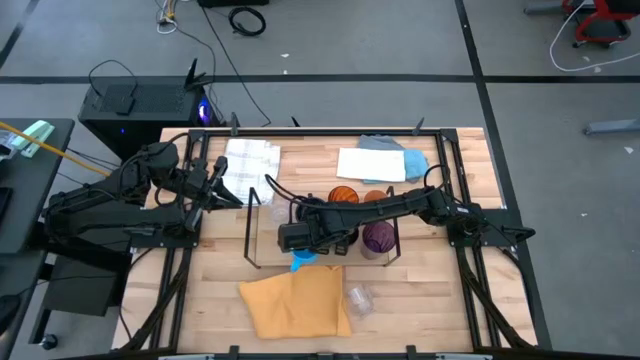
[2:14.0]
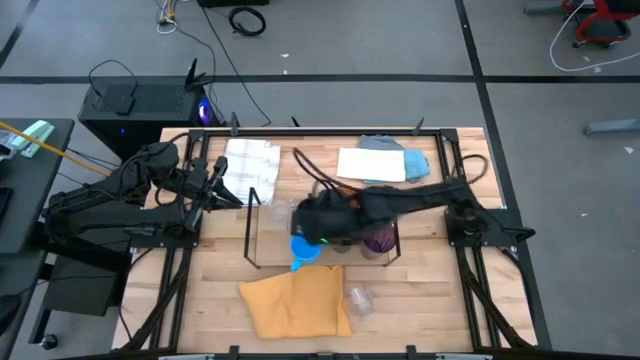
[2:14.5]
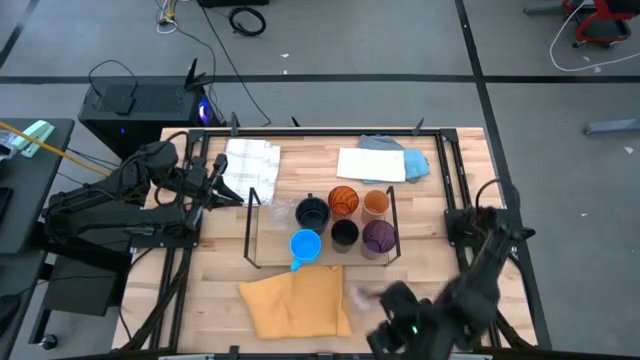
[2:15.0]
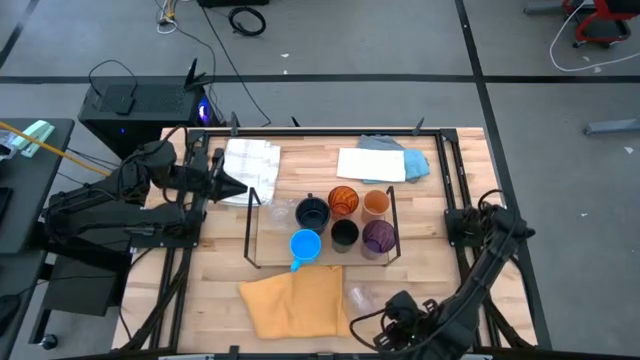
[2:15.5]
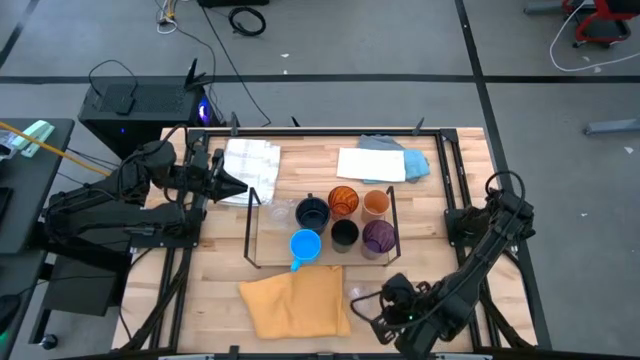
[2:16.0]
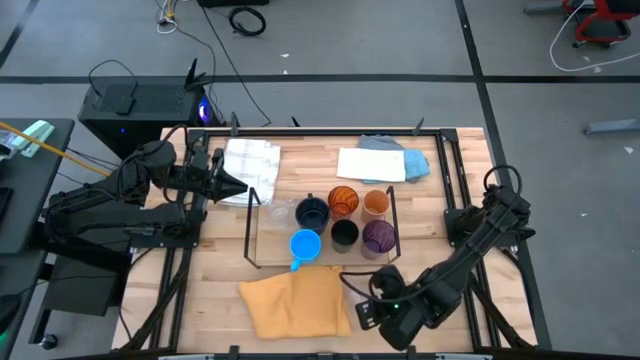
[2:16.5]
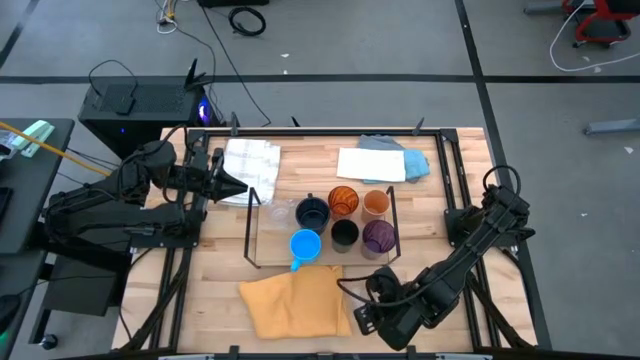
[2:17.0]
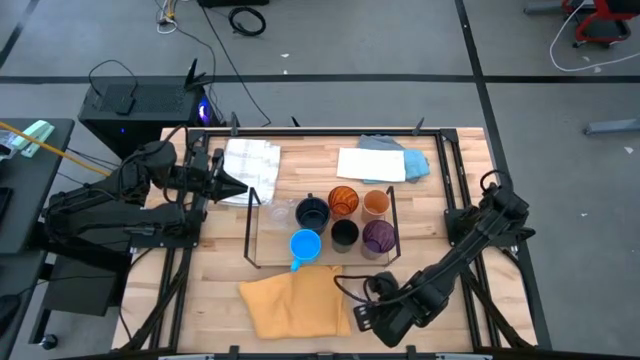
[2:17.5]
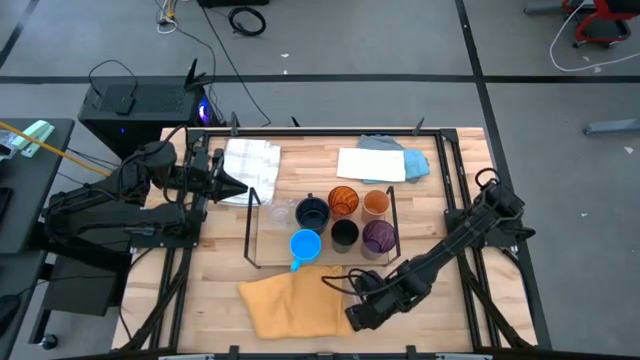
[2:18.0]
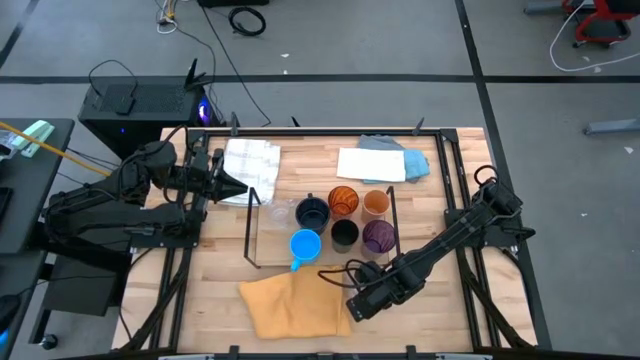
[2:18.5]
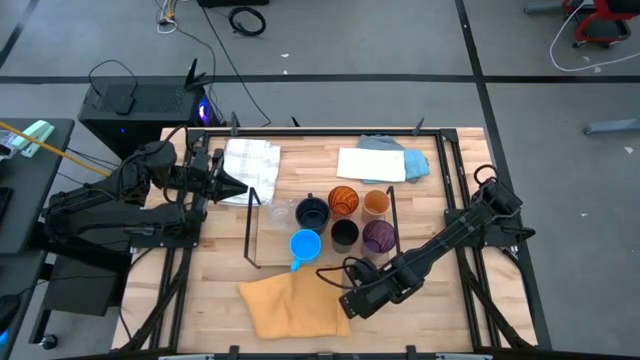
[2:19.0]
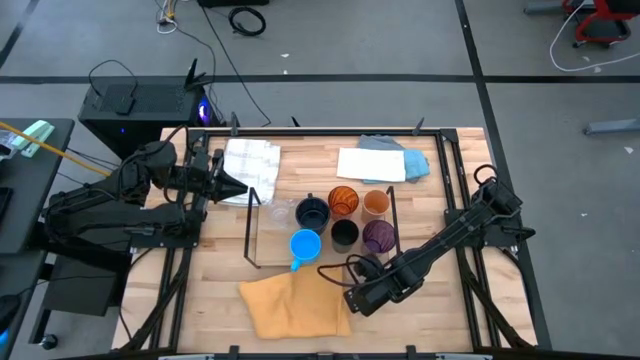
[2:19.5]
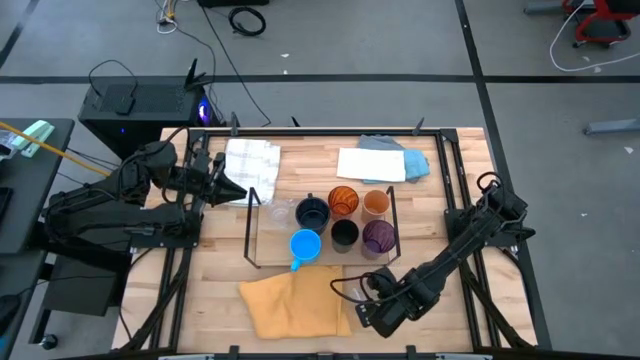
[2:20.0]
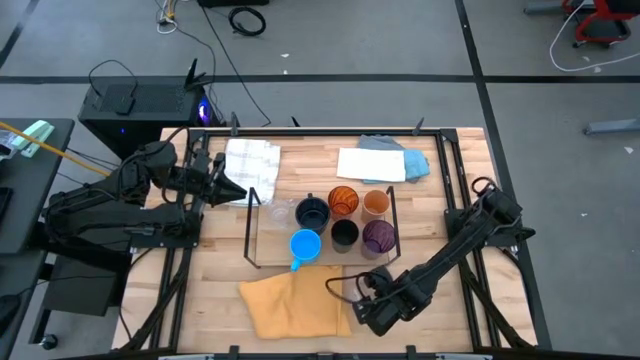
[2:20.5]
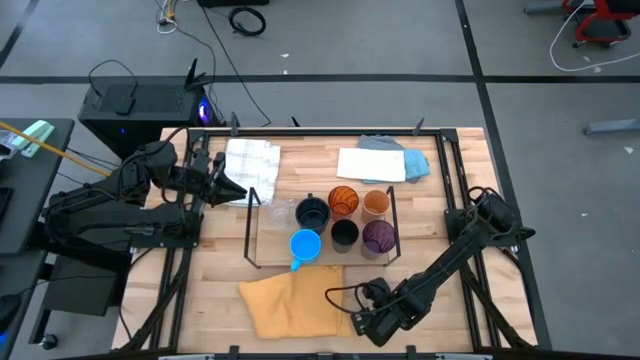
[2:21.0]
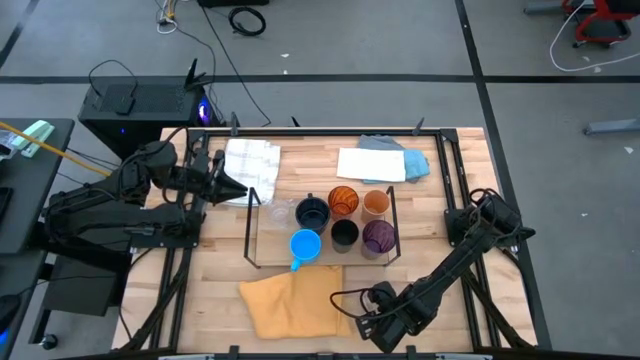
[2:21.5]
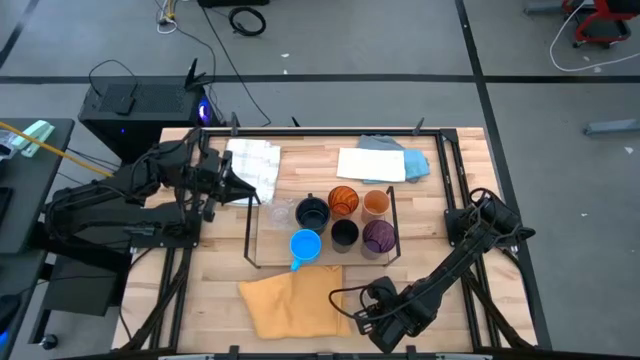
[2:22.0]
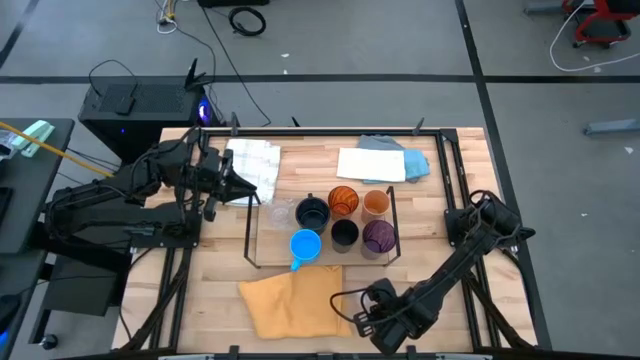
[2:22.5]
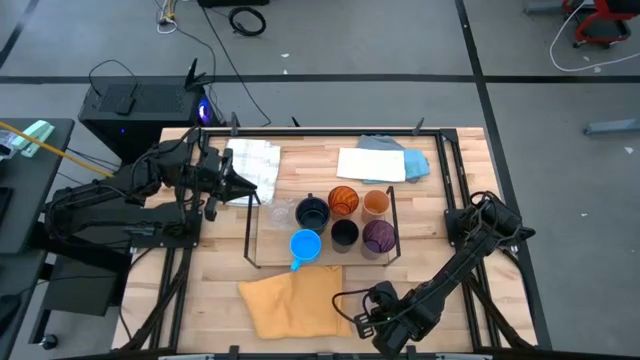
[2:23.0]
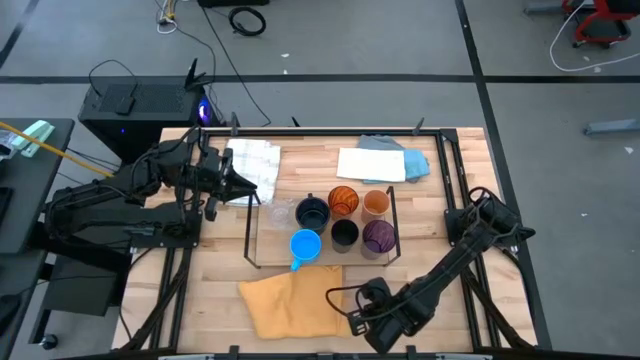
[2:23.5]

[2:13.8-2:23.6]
Task: Stack small to large cups/mugs on shelf
Put the transparent cup on the shelf aligned with the other transparent cup

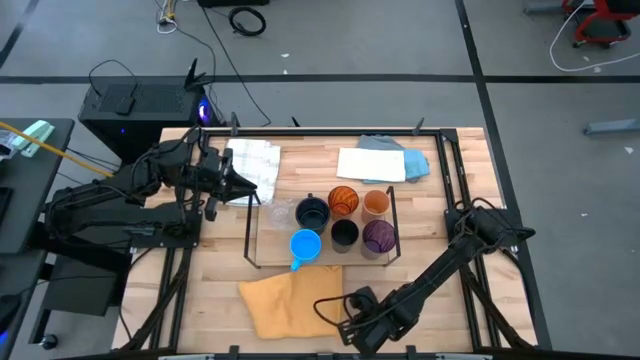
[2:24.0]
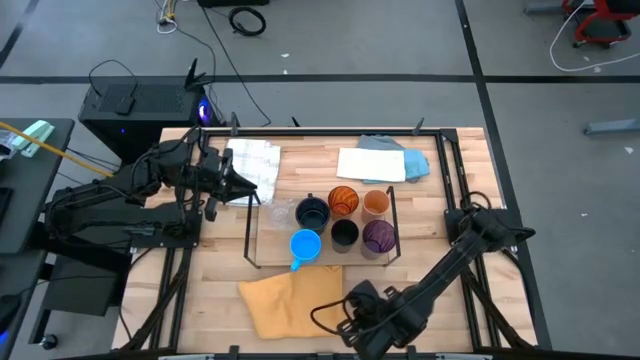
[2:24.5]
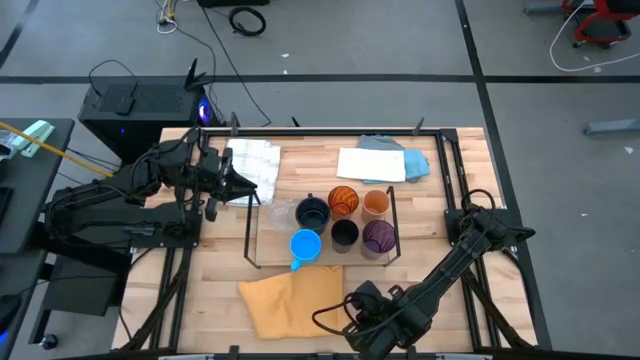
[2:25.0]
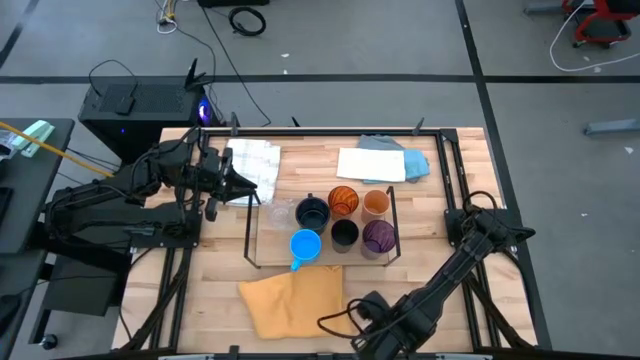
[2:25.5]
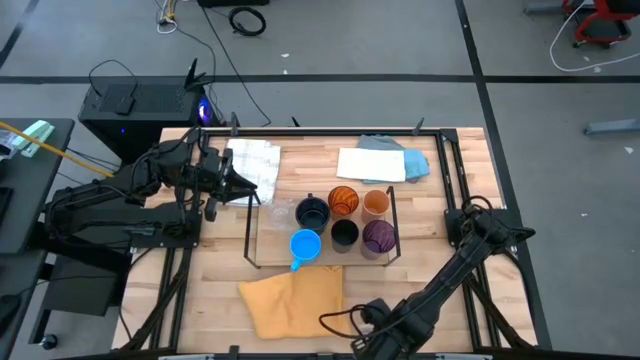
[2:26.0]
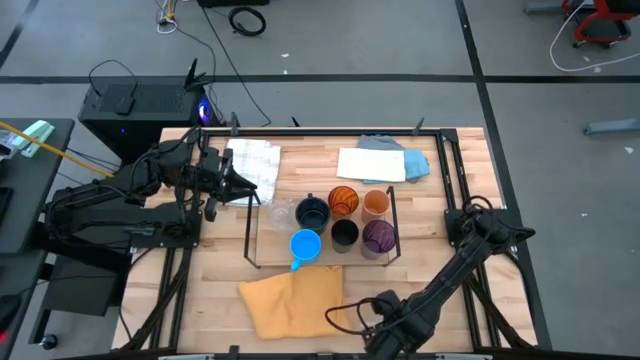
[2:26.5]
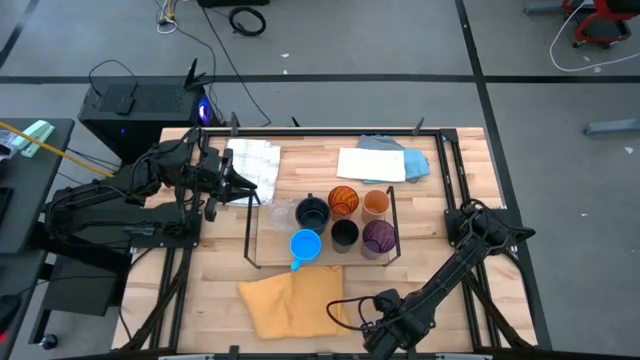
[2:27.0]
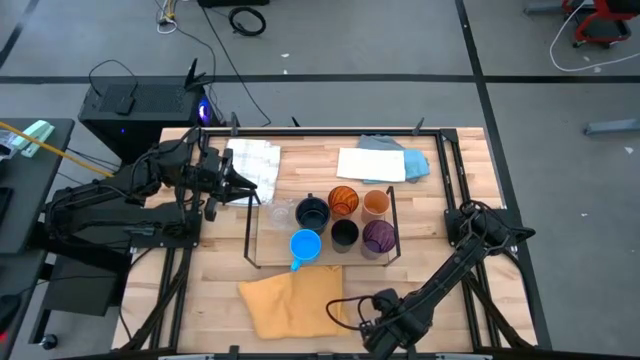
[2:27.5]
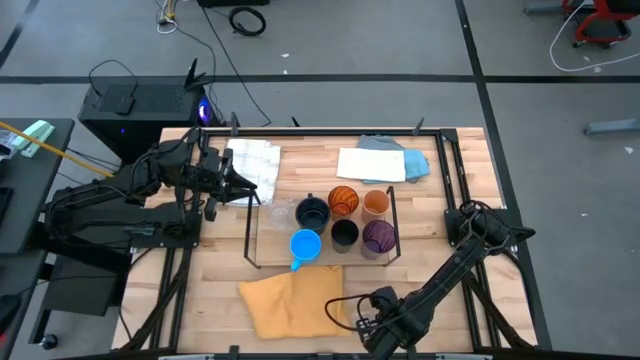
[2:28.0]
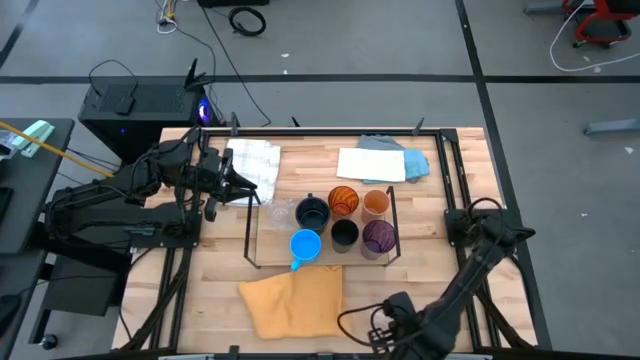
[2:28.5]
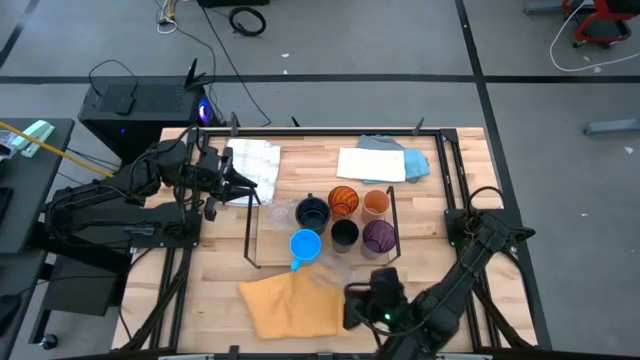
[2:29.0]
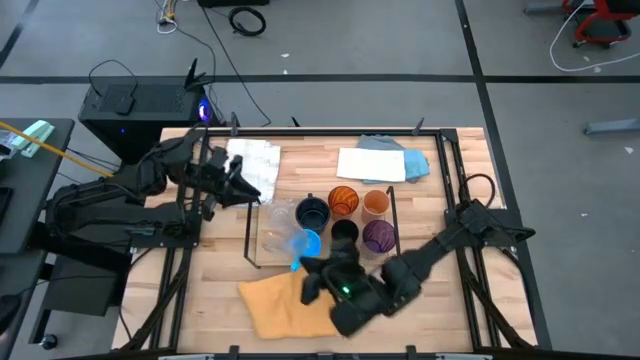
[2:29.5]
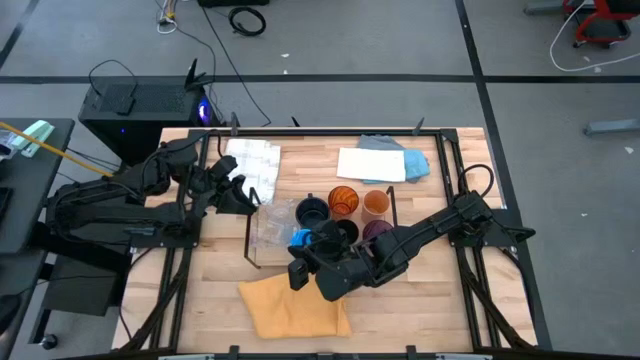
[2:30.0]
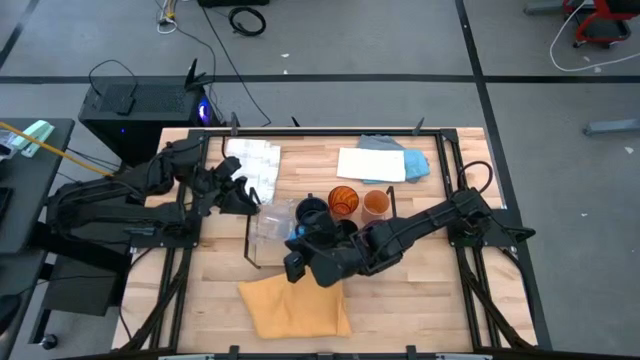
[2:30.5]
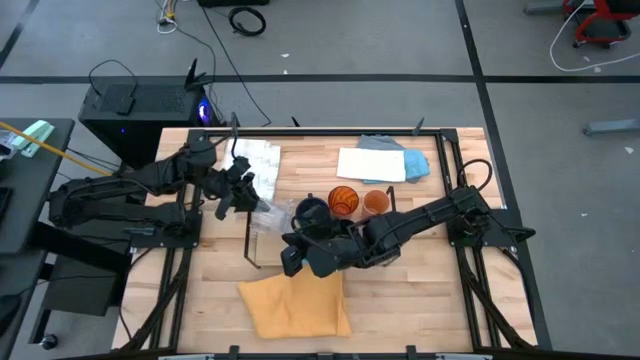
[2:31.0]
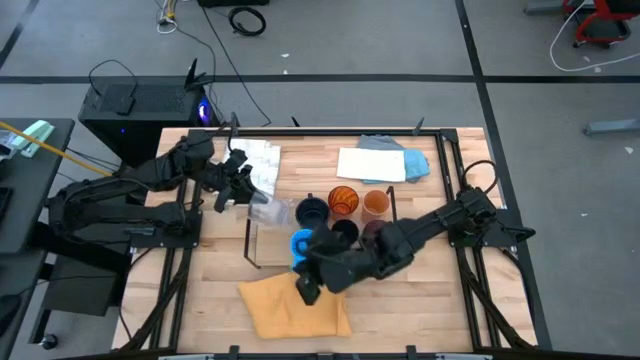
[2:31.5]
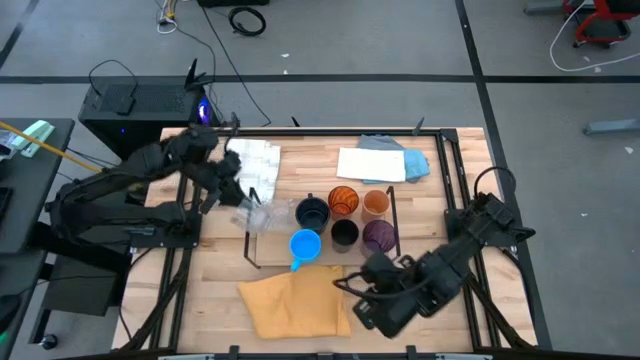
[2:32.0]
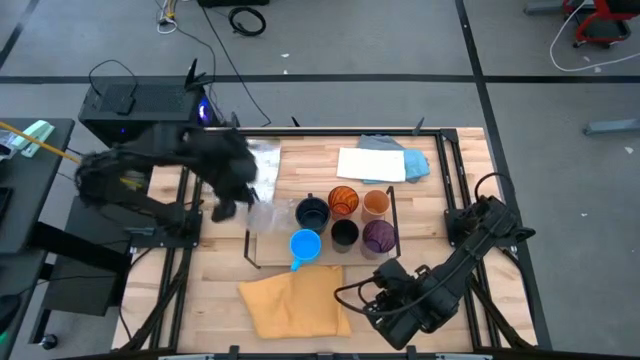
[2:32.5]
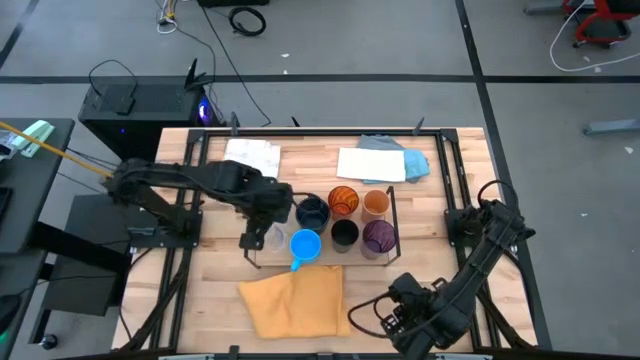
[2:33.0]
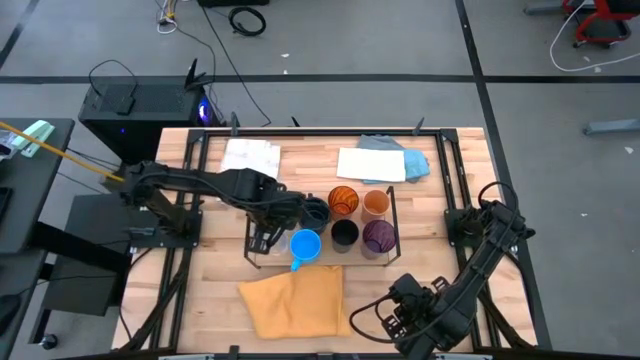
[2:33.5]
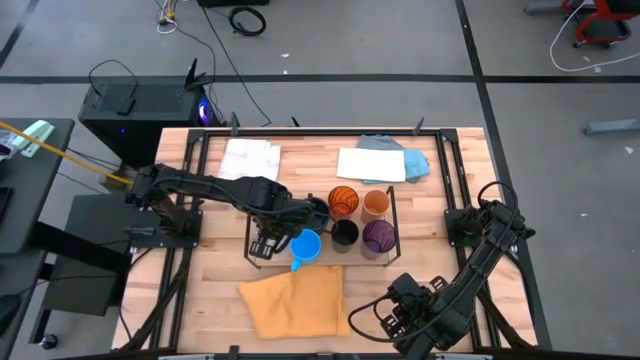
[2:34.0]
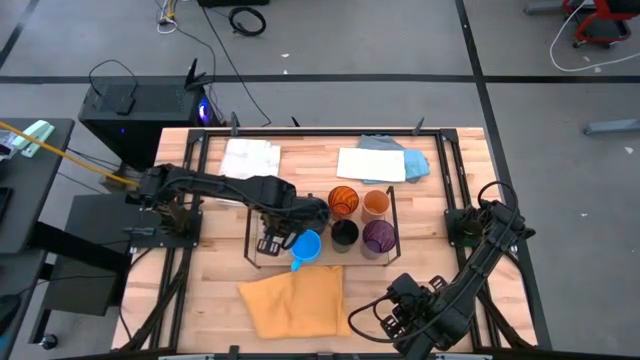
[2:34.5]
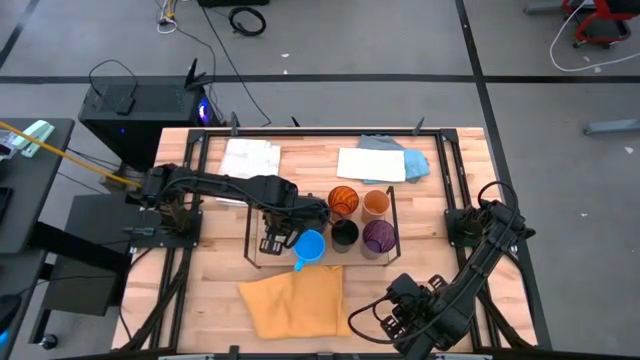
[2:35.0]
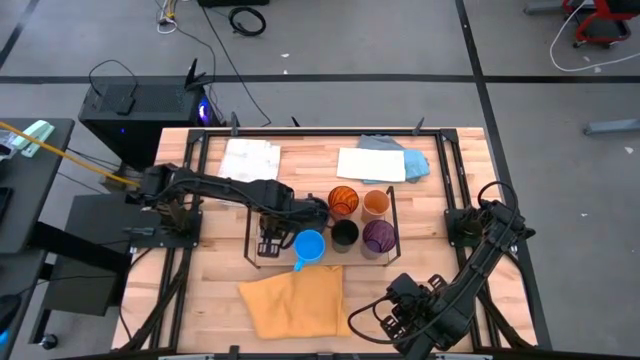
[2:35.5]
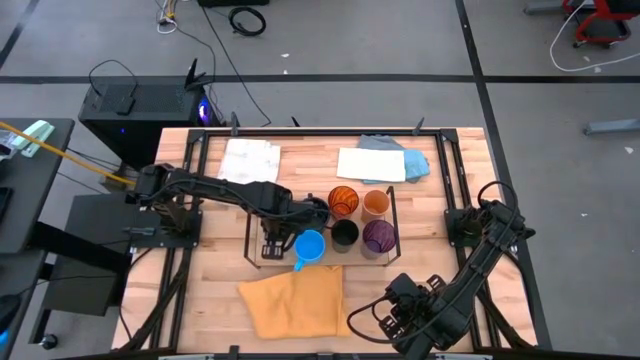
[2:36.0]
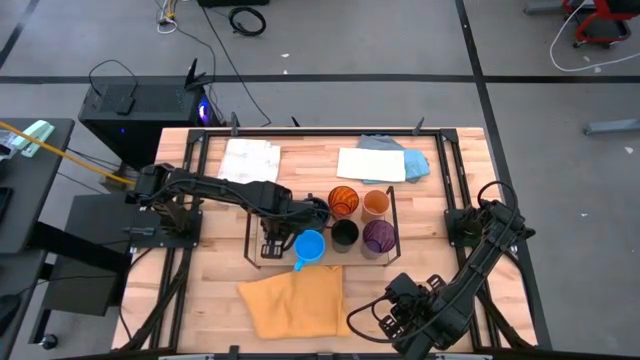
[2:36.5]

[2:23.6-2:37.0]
Put the transparent cup on the shelf aligned with the other transparent cup
